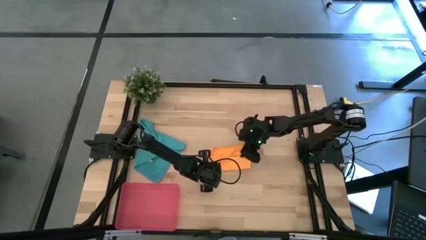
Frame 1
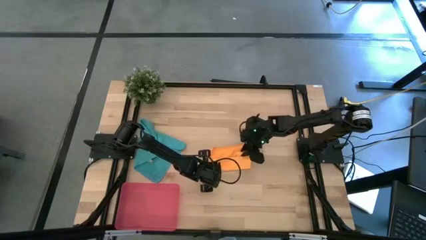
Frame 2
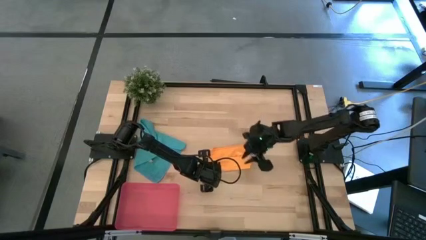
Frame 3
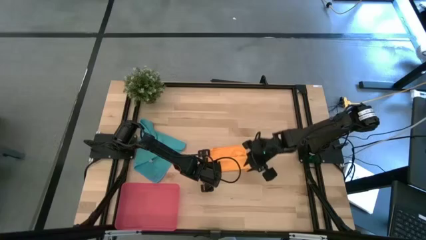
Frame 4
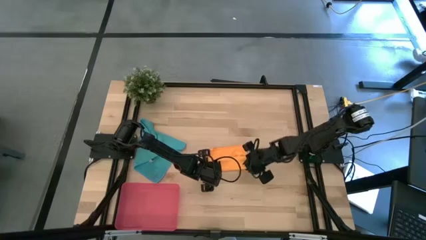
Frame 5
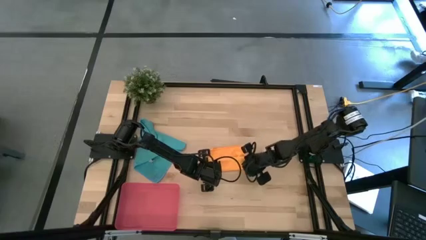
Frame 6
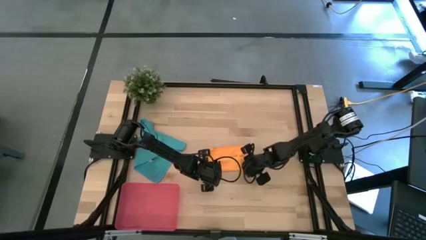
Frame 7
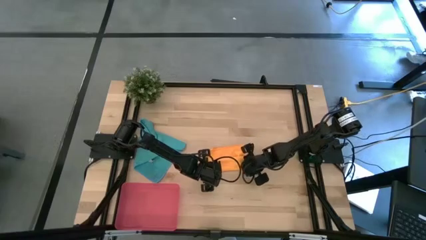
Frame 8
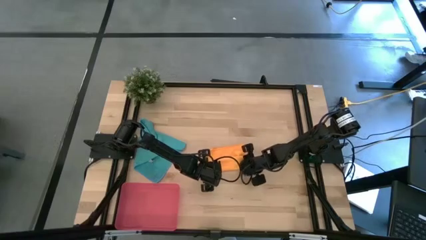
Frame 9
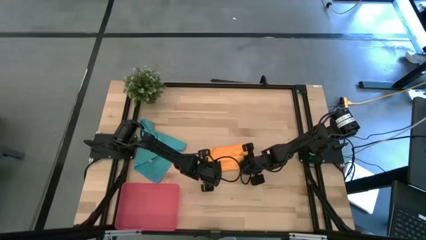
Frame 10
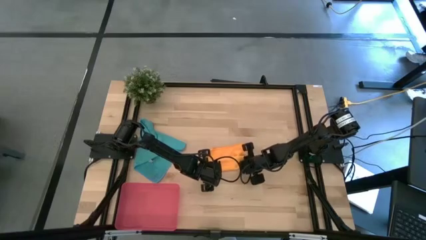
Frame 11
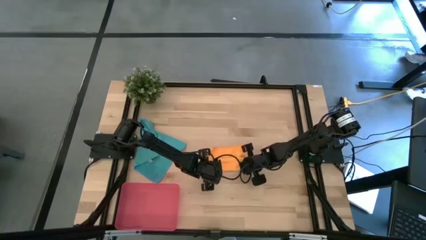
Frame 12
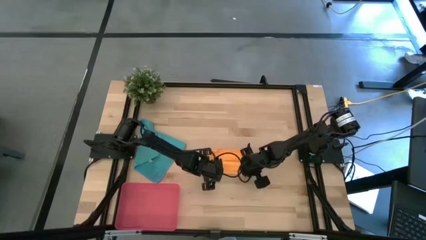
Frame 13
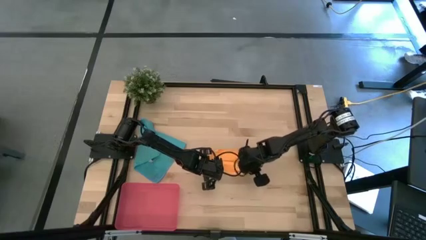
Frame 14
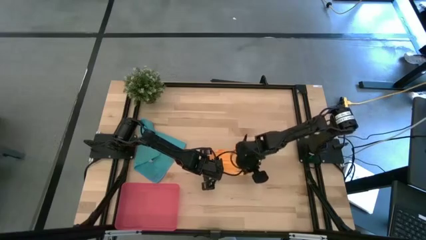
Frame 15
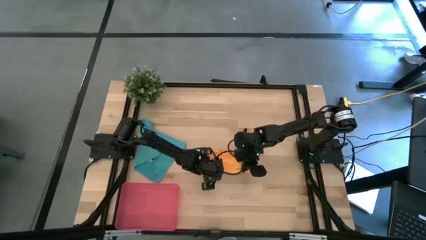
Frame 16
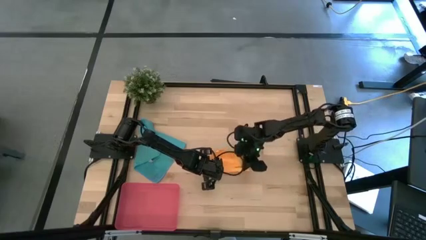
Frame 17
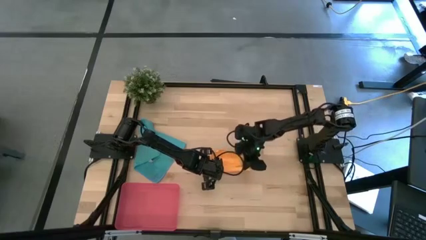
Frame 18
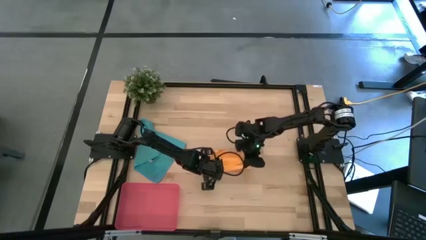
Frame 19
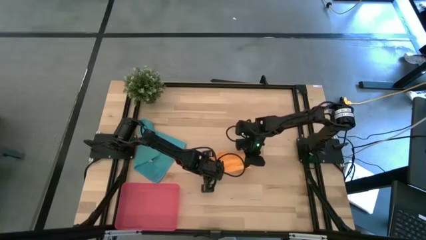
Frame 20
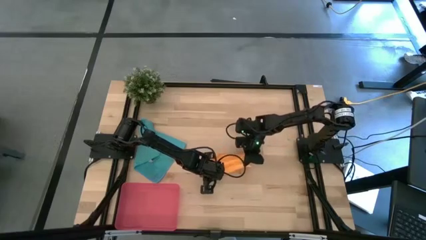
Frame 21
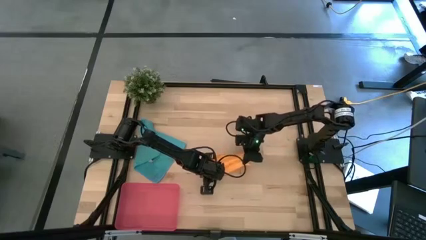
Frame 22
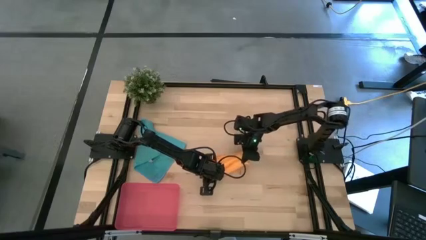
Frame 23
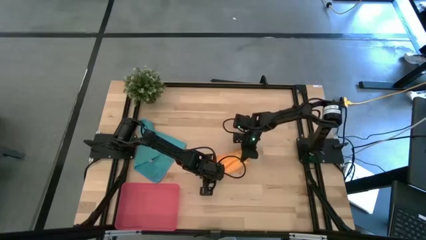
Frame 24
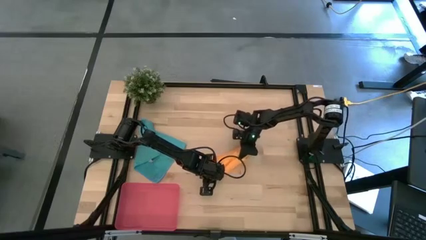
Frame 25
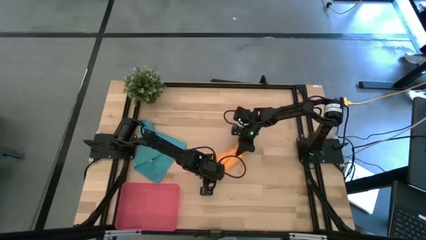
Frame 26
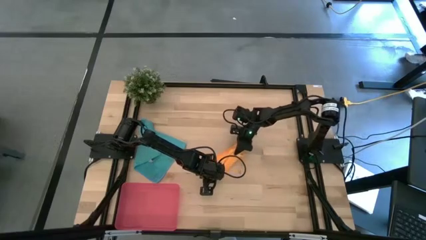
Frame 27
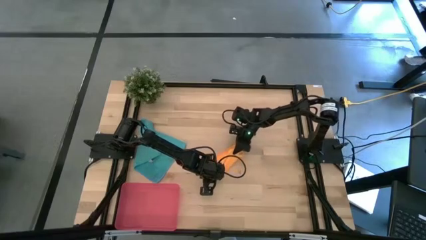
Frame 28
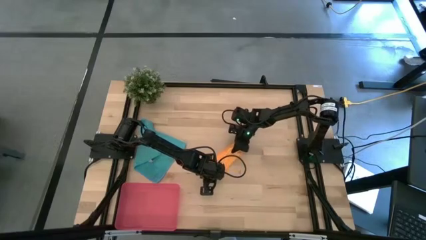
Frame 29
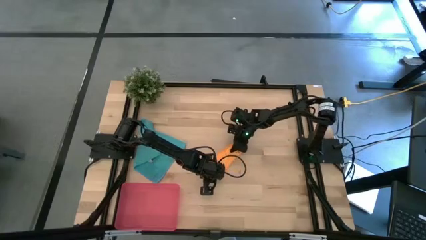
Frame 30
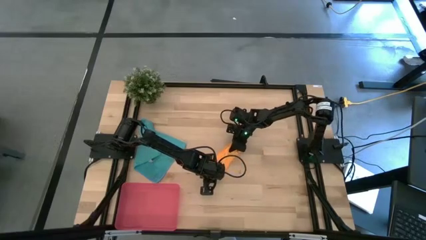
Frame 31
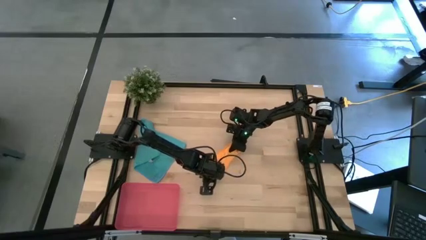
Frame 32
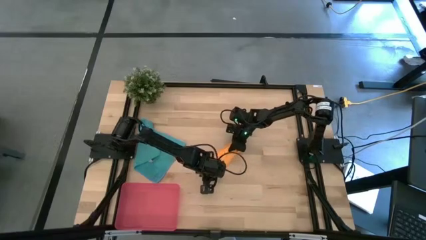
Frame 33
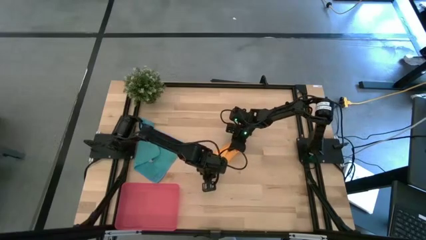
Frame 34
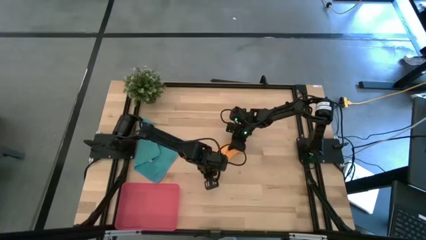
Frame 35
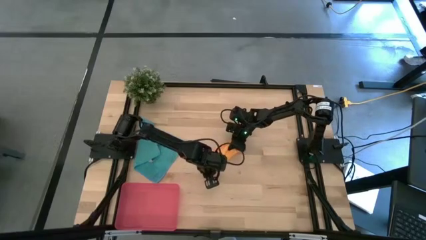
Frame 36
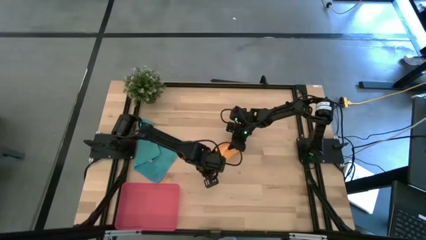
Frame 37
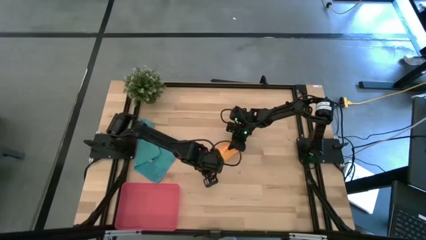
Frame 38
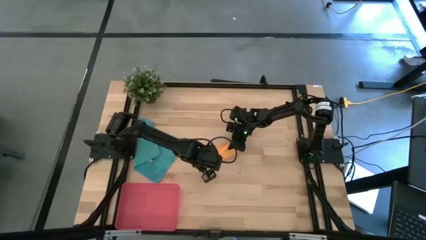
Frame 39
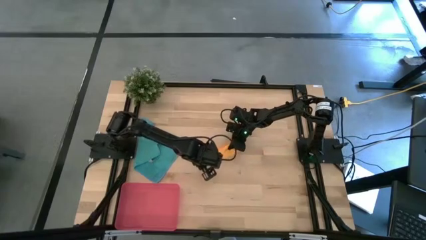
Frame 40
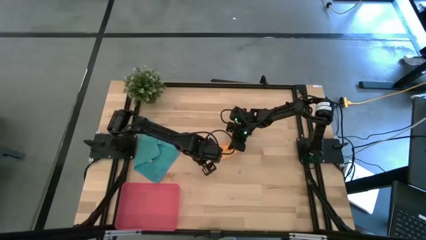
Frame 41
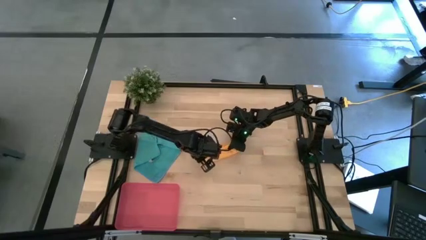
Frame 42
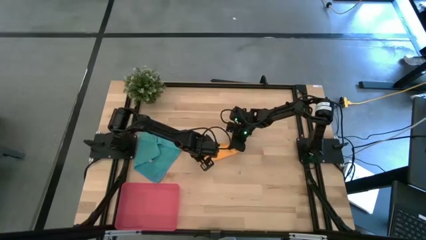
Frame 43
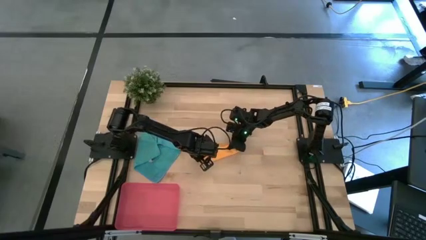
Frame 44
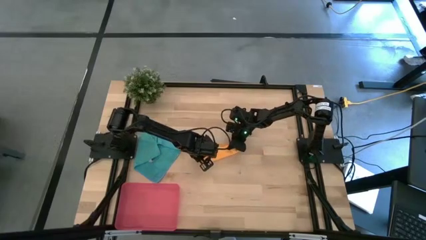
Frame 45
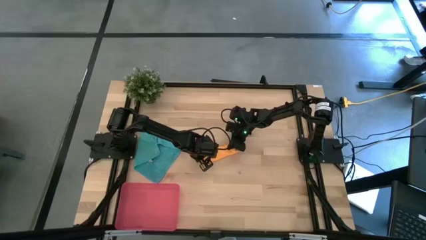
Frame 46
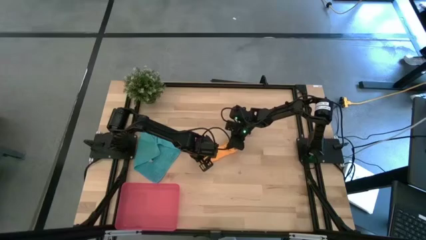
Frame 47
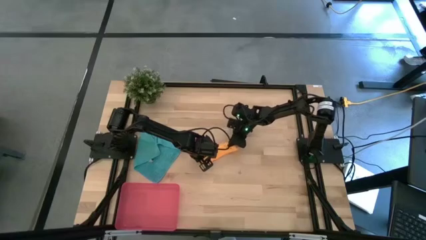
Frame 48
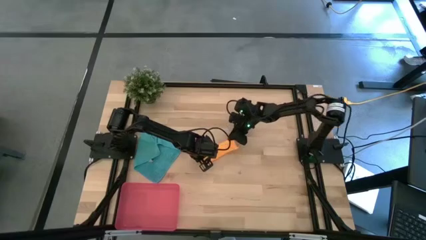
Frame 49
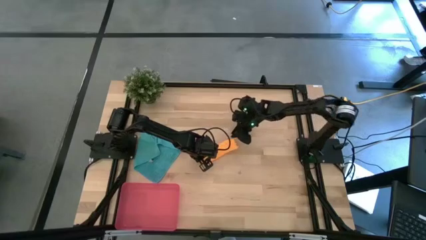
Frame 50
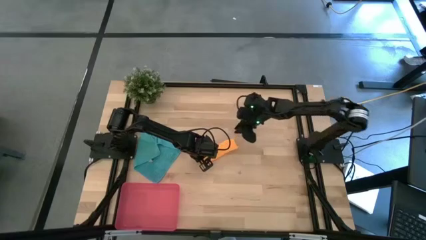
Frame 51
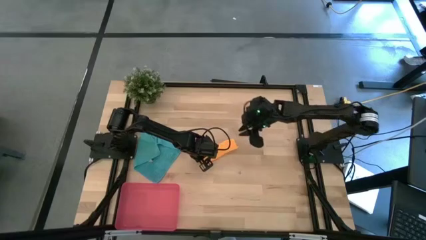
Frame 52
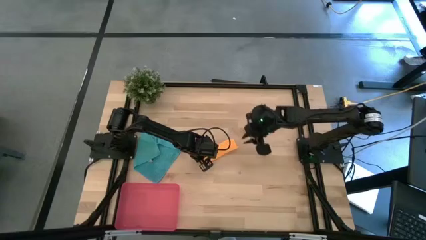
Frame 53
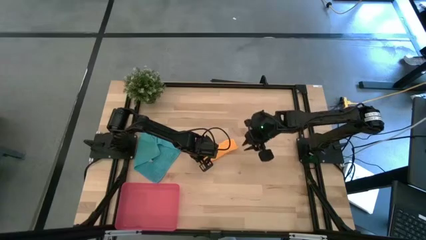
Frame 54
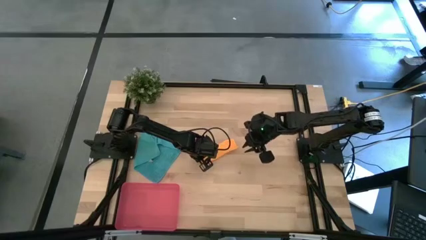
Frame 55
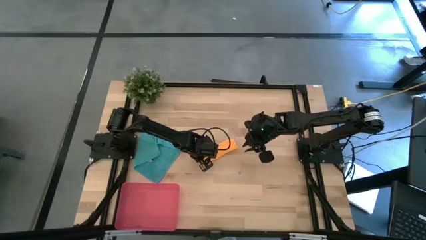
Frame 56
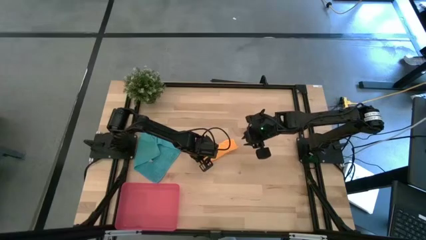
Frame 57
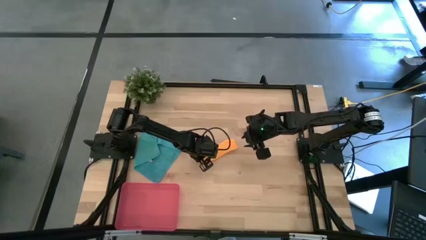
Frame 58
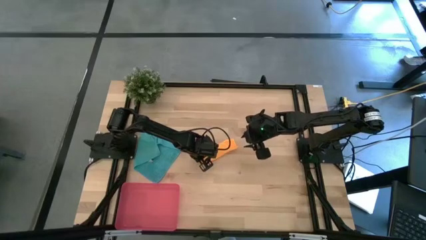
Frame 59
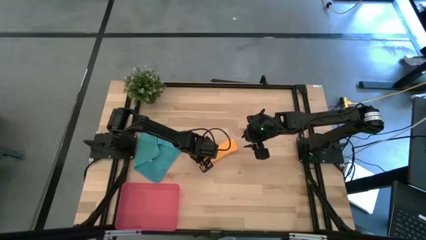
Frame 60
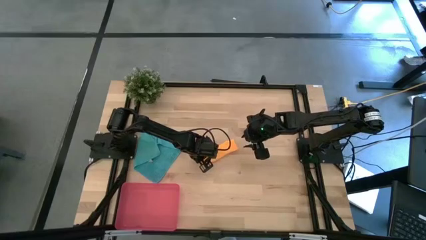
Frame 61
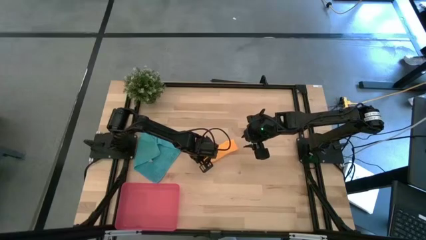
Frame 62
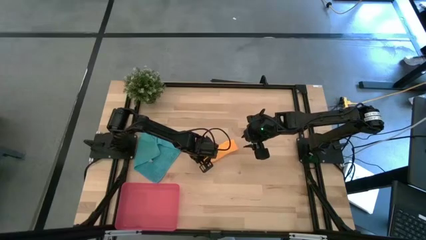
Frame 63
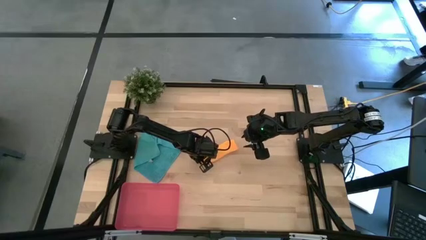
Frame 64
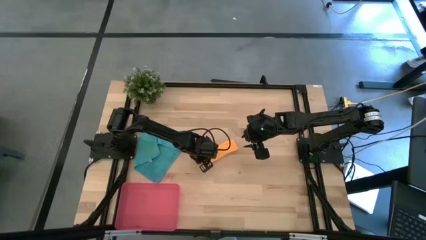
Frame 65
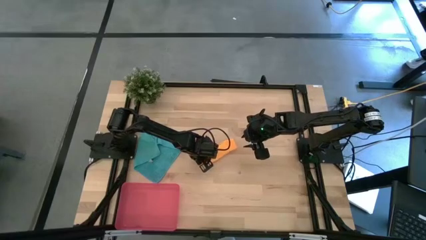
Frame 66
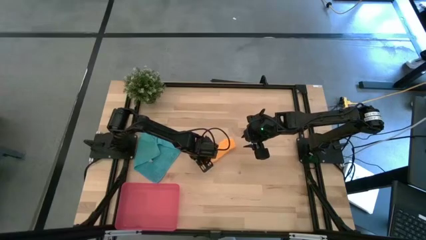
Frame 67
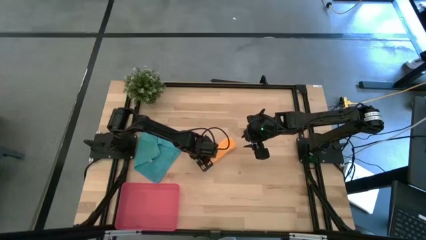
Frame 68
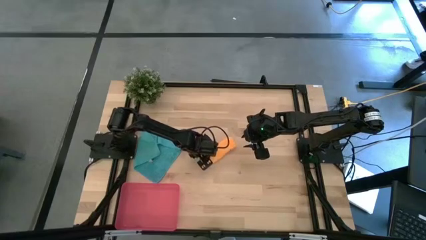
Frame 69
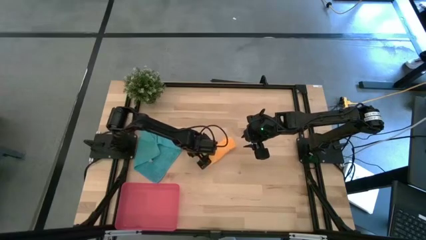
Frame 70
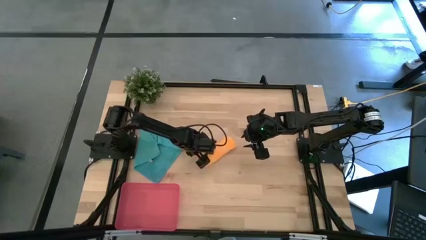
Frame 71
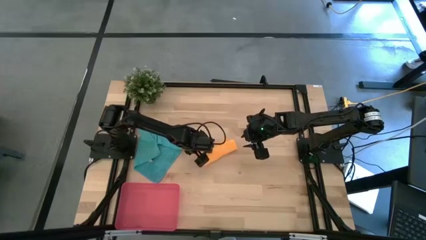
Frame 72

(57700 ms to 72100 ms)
Task: Roll microfiber towels into tight, uniform cylinder then place into a basket
Roll the yellow microfiber cloth

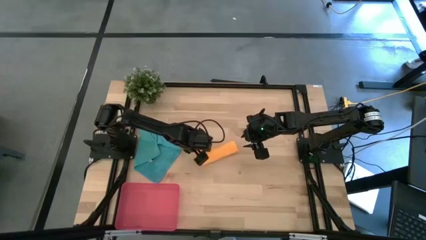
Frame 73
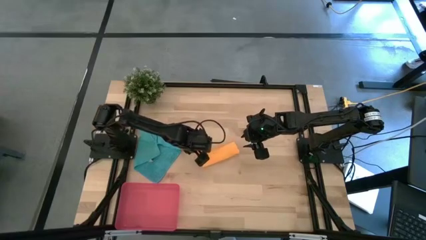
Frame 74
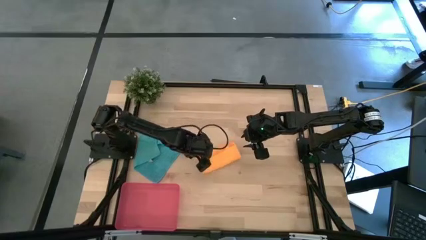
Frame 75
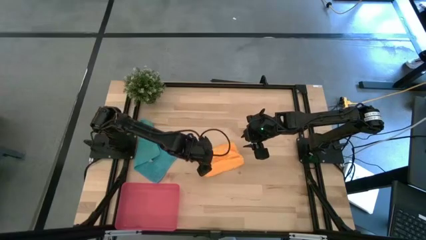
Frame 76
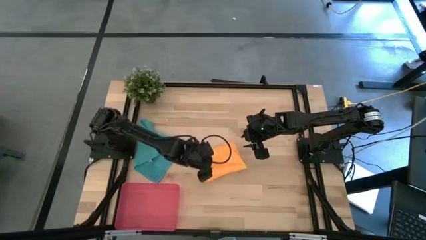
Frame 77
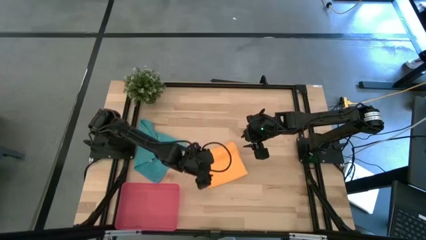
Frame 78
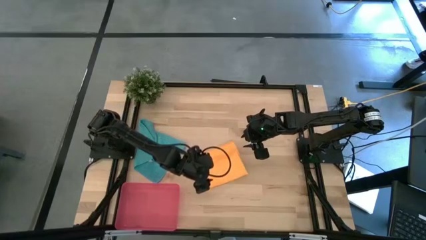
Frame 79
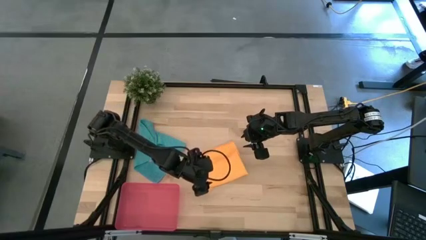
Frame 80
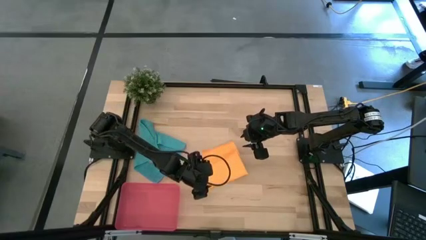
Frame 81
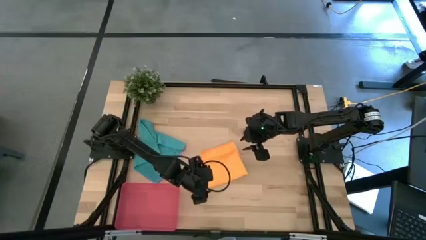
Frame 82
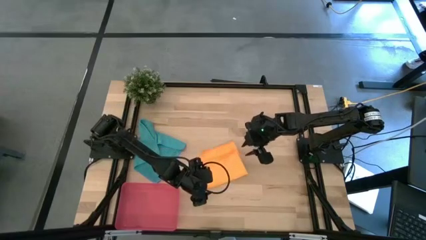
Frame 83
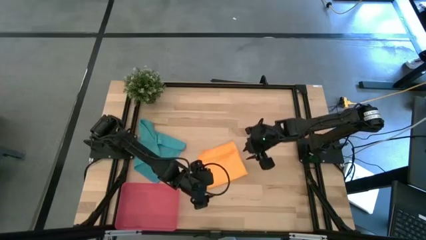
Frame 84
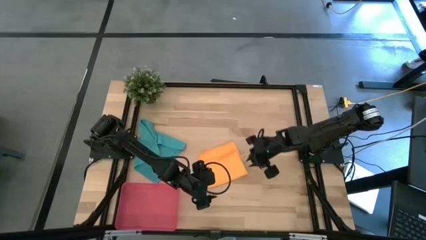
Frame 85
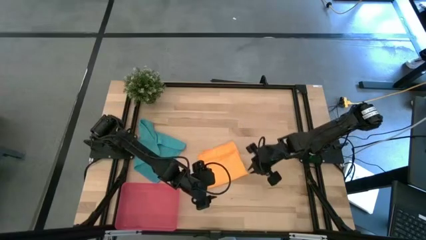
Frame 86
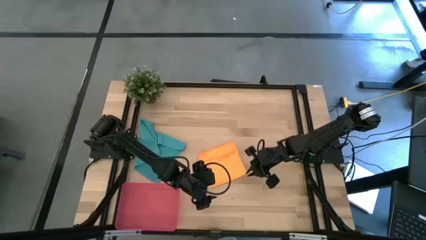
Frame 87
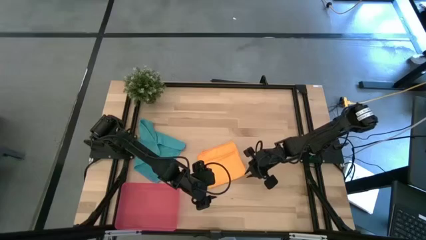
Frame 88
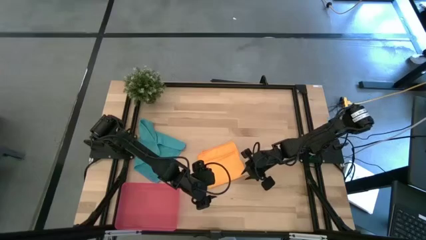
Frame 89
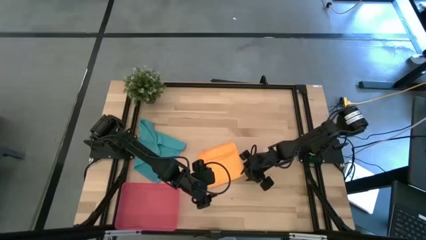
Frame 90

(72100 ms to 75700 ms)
Roll the yellow microfiber cloth
